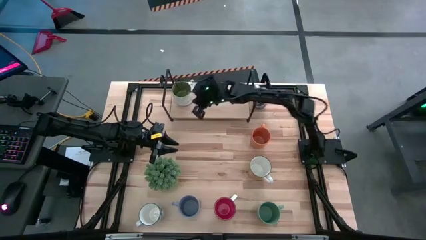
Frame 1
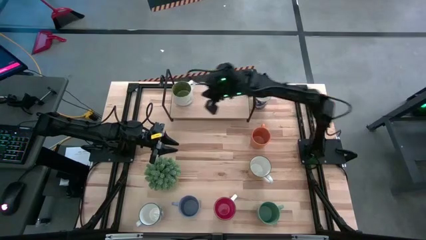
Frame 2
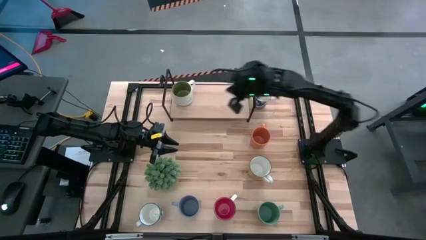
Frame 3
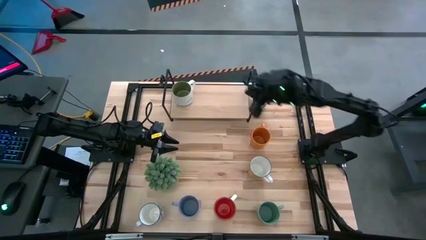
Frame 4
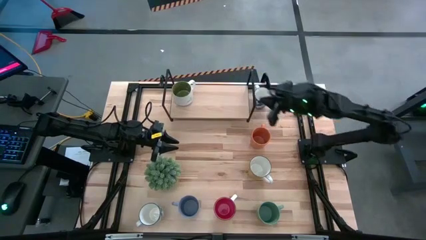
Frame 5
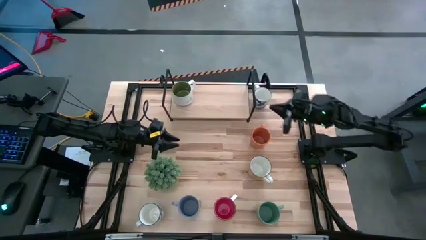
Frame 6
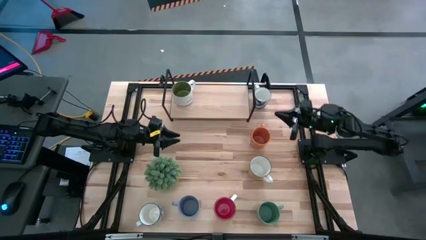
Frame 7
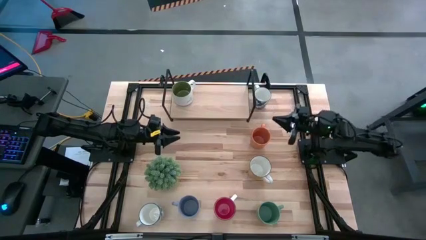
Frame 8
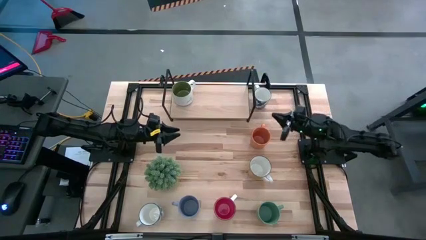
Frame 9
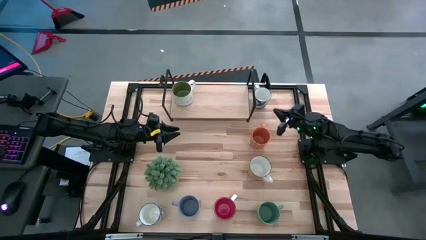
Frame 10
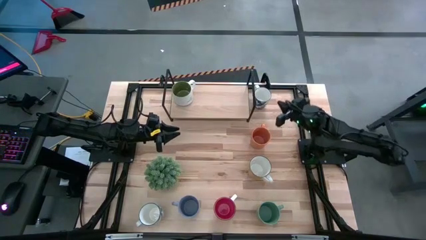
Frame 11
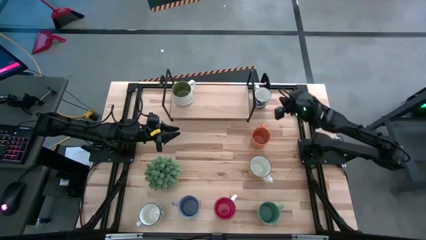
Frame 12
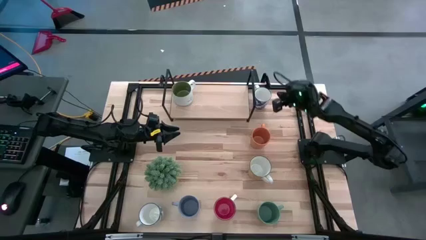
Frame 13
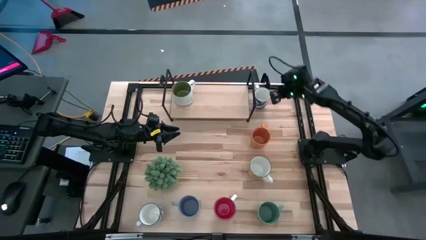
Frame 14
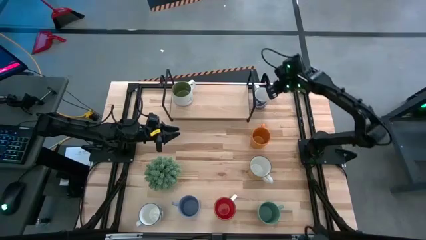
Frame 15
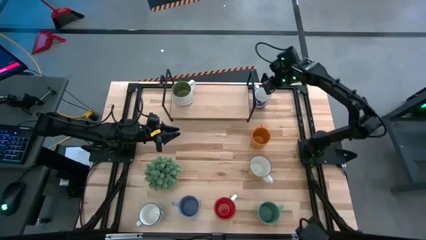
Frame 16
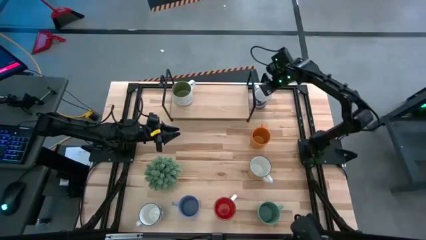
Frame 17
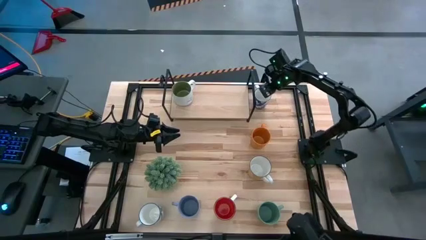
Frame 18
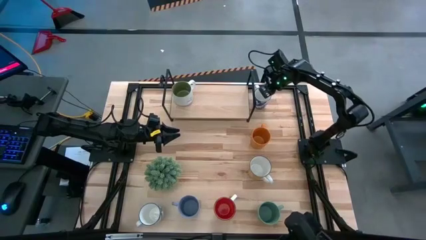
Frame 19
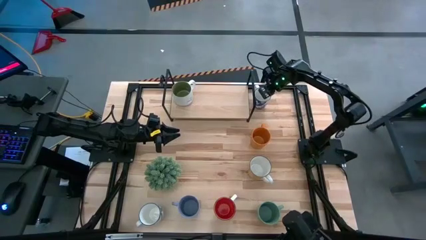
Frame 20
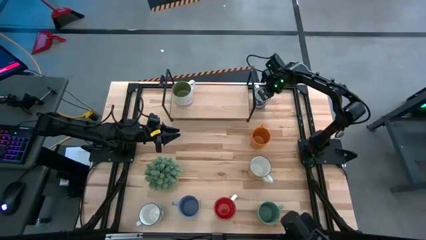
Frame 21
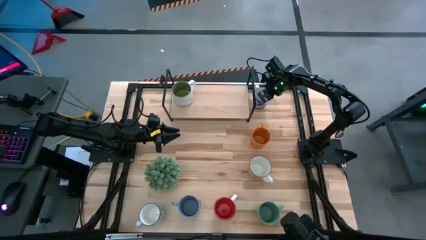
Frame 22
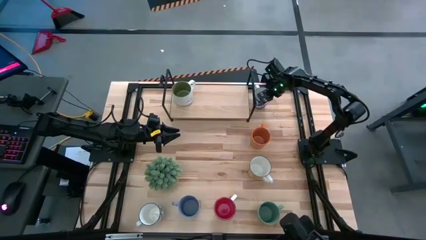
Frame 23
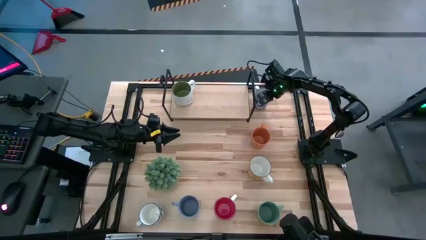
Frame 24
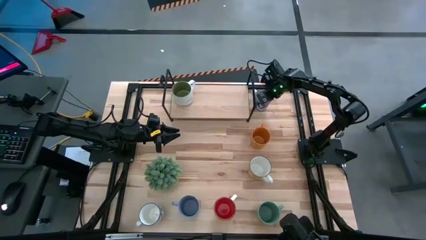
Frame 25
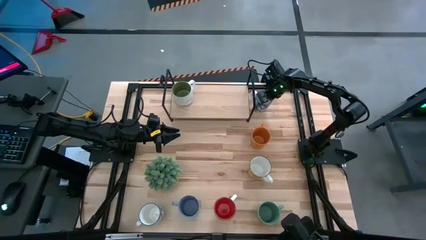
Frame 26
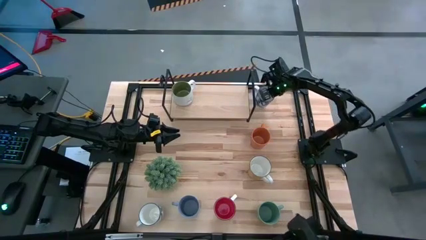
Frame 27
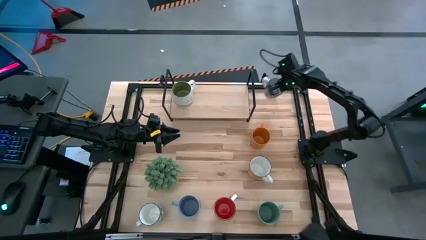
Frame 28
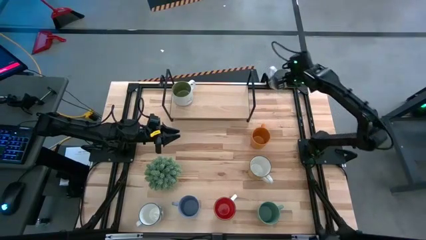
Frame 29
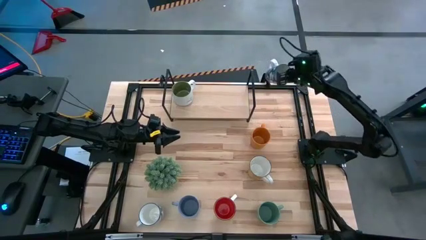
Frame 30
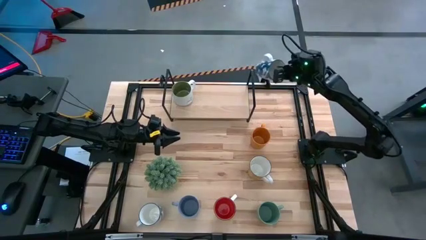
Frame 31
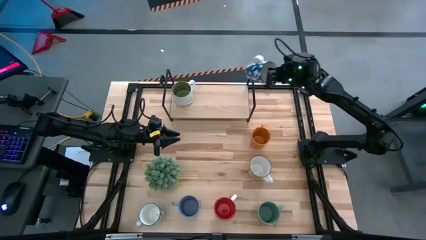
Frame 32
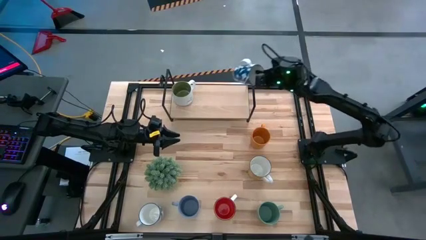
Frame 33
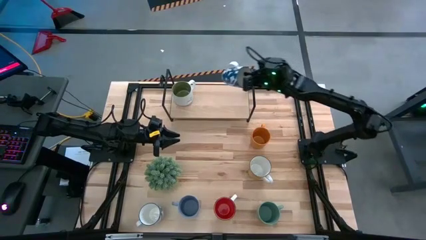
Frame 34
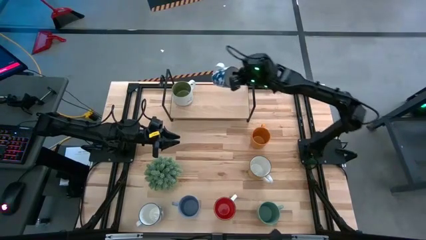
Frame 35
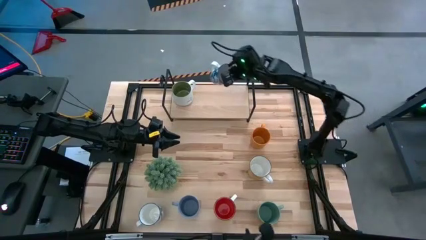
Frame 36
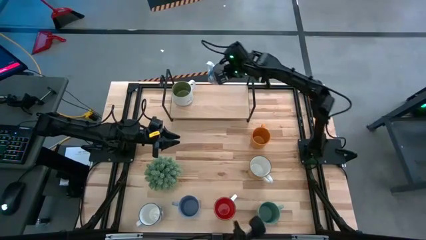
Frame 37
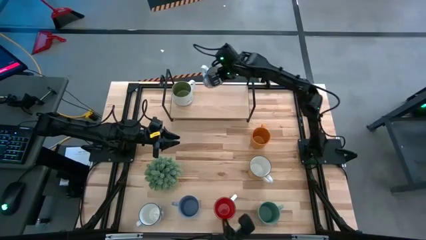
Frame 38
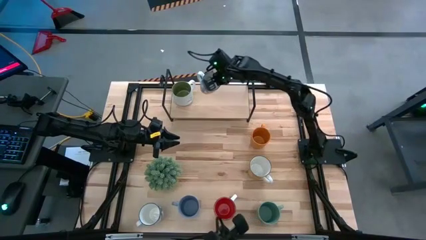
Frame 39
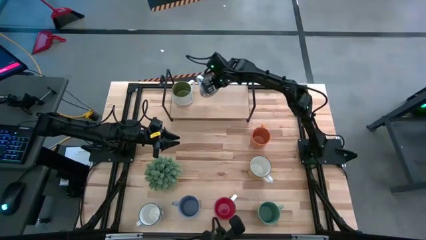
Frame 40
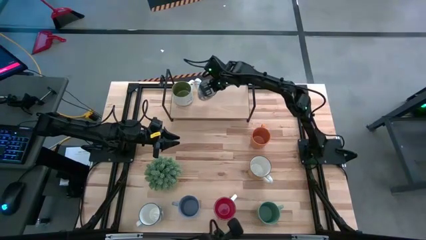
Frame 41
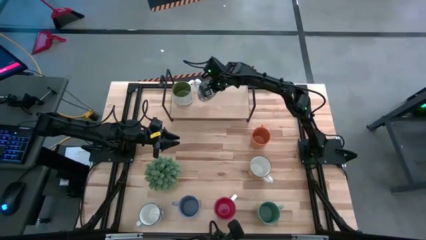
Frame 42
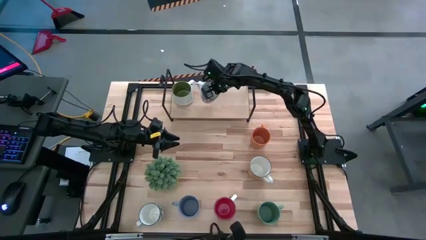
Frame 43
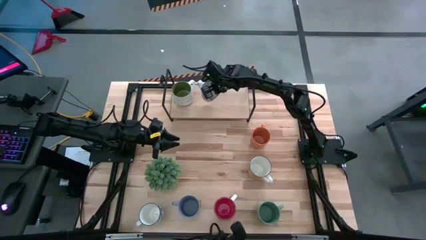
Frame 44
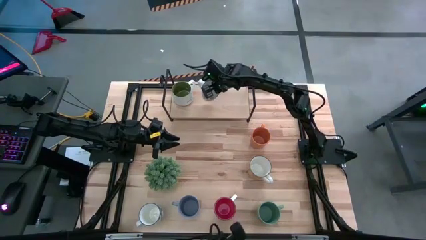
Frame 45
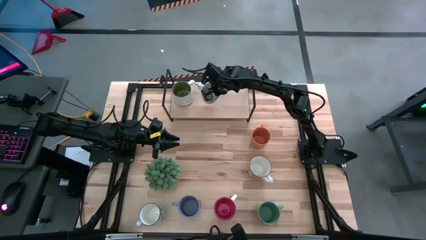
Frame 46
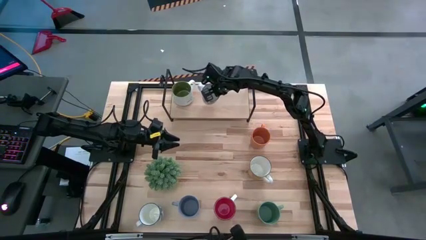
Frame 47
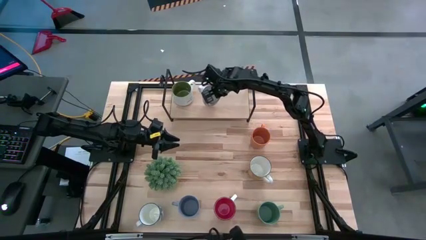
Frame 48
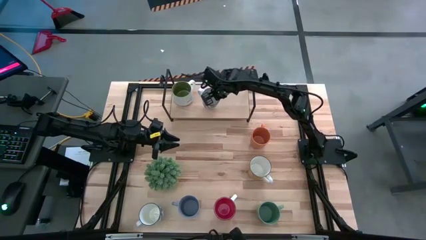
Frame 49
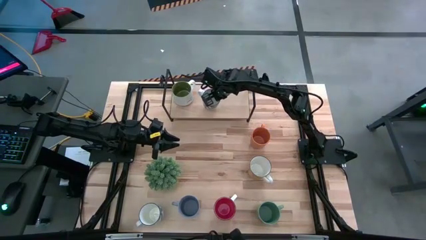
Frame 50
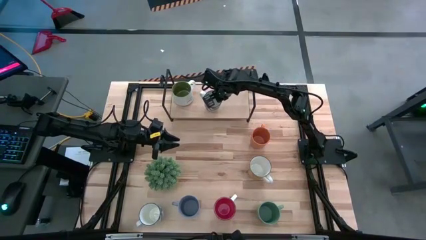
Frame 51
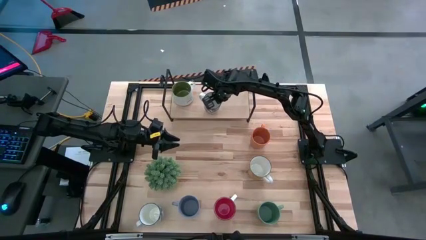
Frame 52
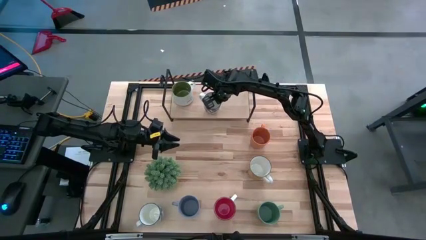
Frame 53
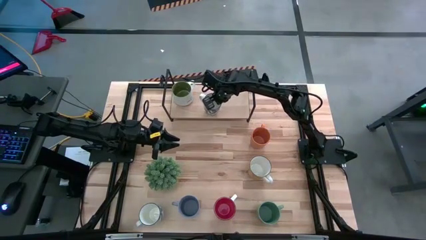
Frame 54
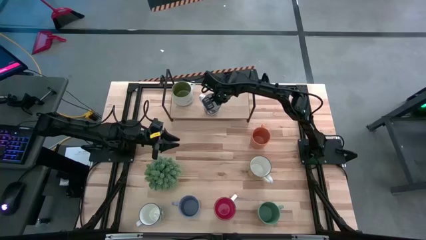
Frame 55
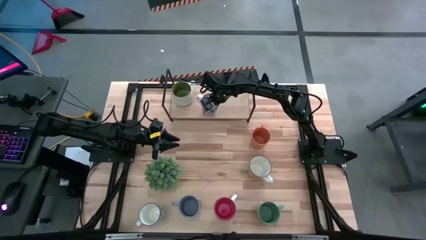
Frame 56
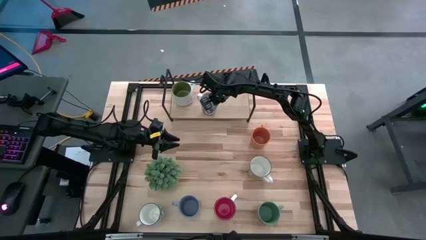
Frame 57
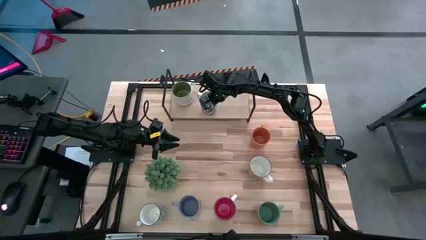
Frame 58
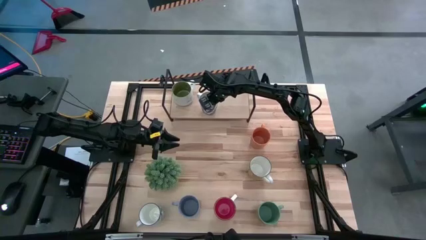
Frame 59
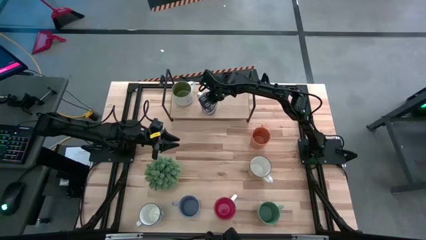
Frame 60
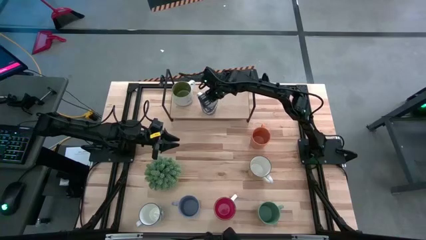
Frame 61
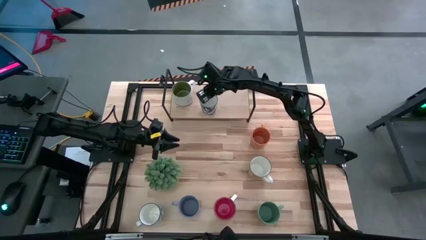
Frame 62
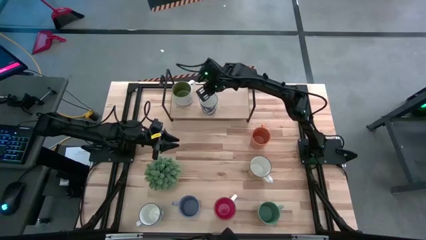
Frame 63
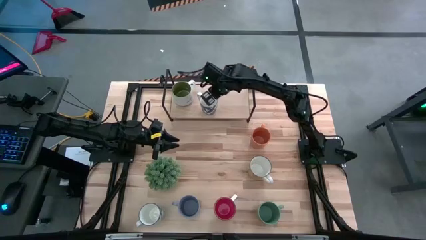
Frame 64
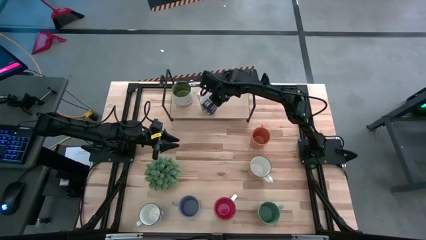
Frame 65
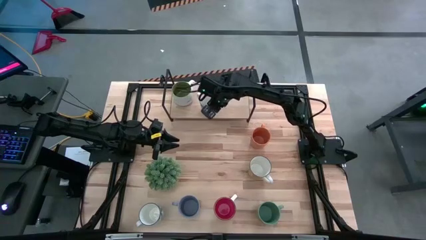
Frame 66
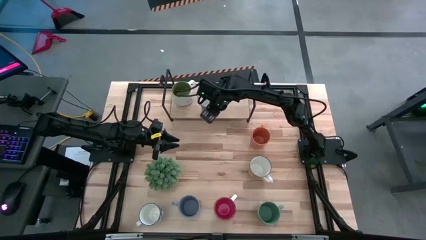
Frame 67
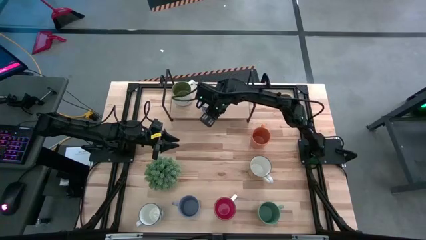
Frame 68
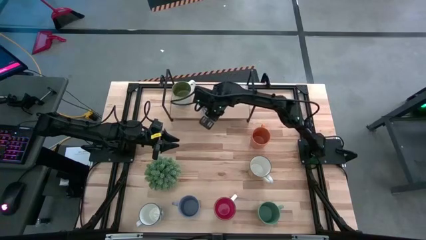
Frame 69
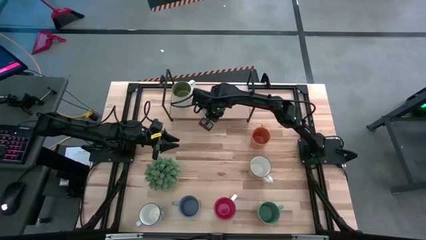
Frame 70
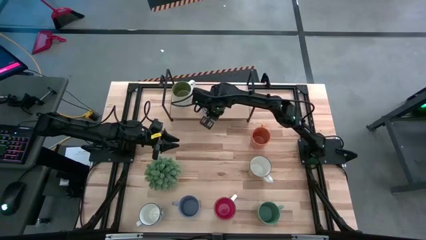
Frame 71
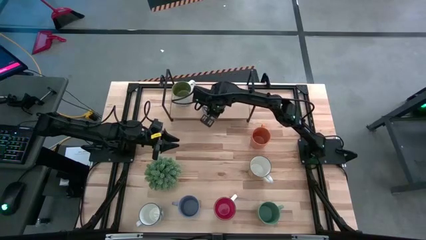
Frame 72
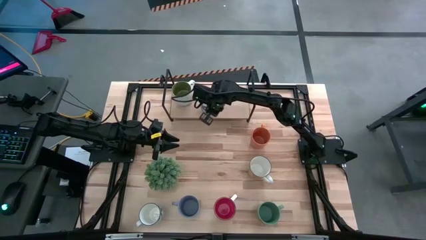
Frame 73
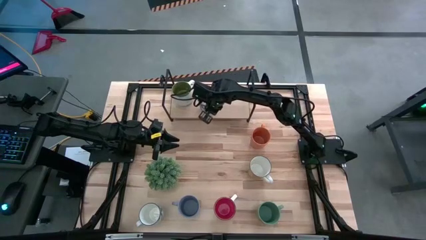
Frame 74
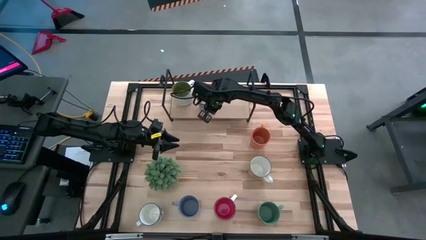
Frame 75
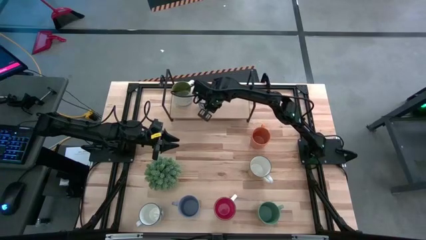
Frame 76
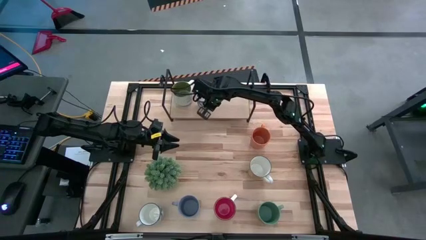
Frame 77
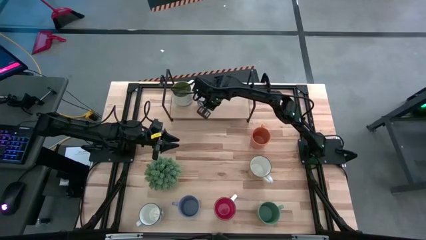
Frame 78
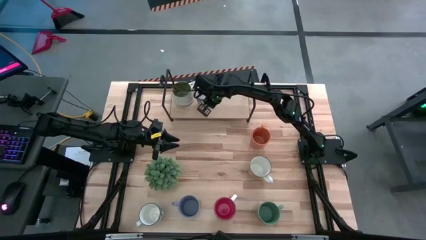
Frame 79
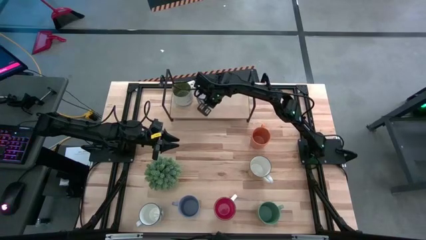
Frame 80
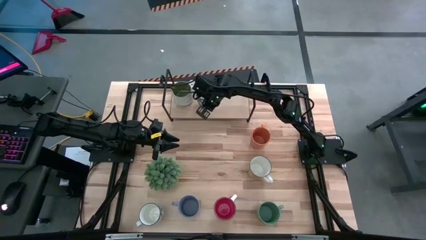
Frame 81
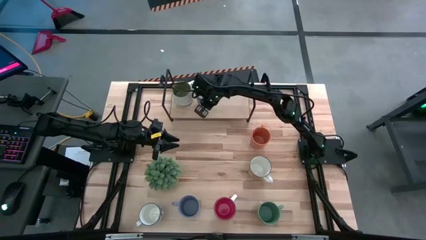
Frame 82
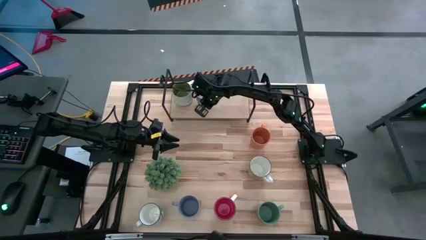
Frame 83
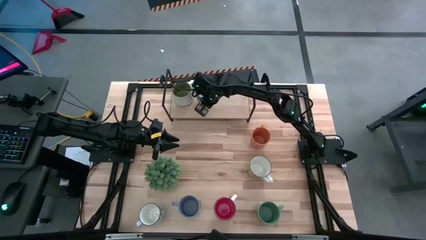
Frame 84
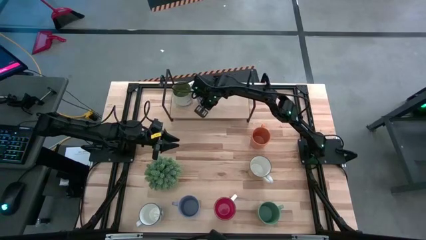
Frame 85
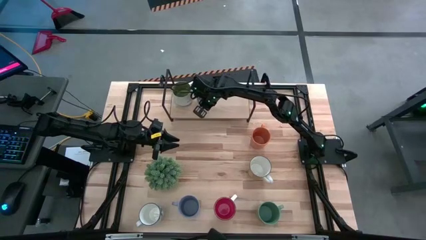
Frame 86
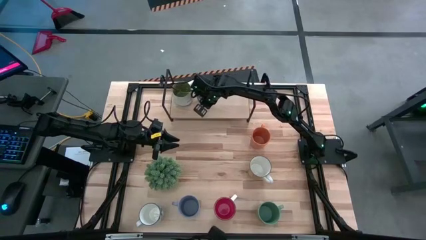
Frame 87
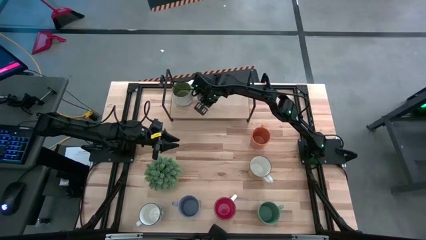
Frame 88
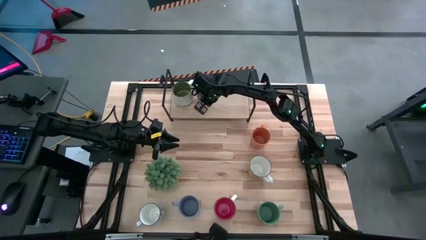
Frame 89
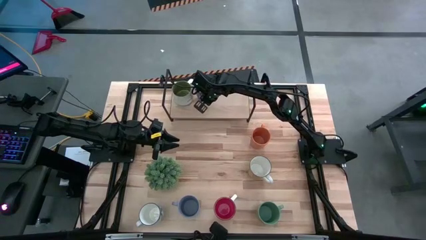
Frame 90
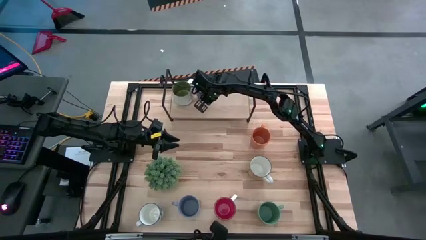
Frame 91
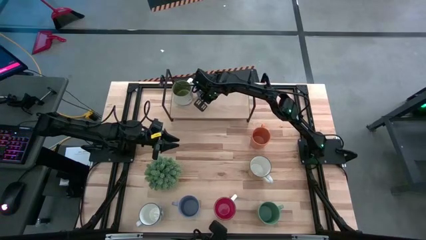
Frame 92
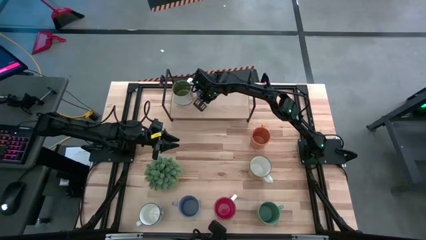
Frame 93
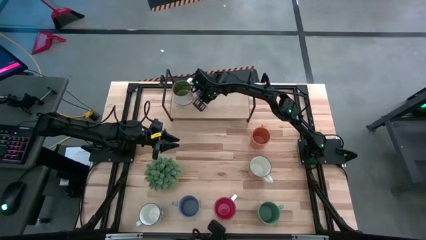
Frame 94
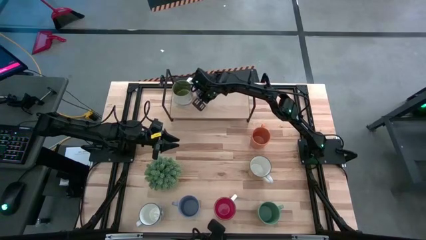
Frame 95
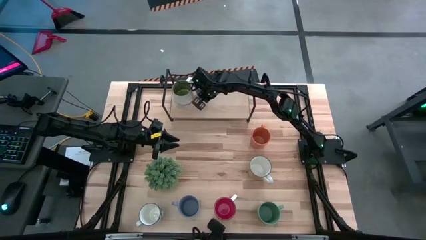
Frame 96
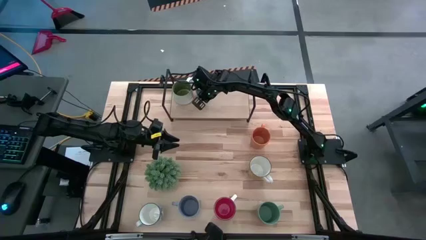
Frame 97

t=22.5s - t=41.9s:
Task: Place coffee mugs
Put the top blue mug on the shelf
